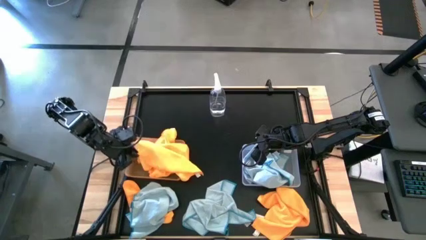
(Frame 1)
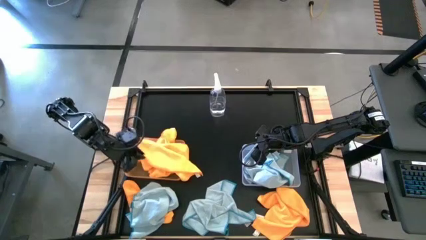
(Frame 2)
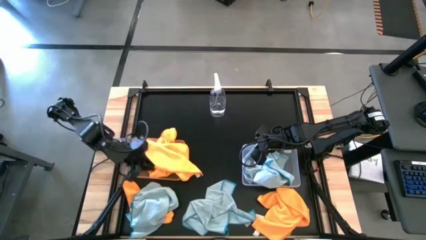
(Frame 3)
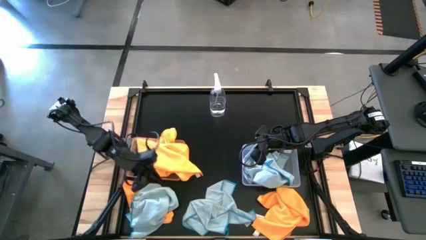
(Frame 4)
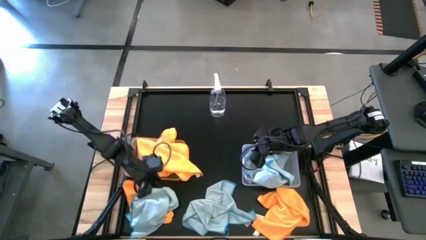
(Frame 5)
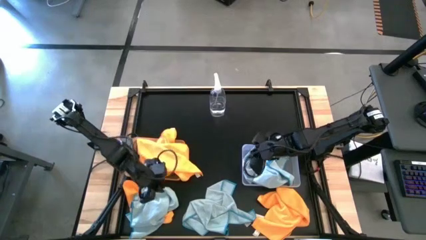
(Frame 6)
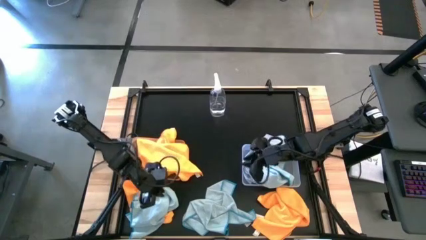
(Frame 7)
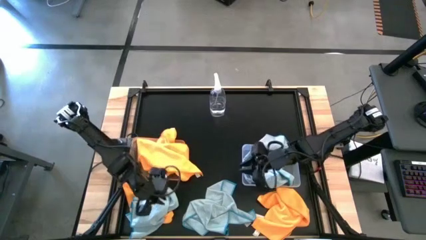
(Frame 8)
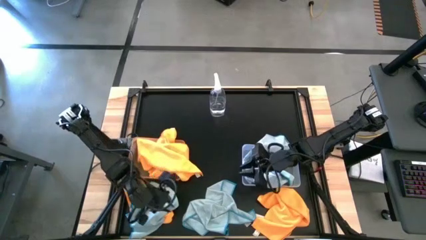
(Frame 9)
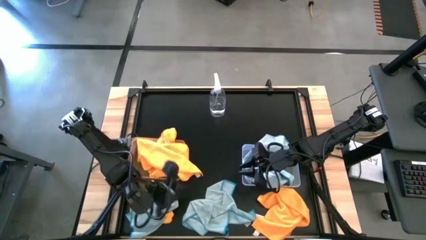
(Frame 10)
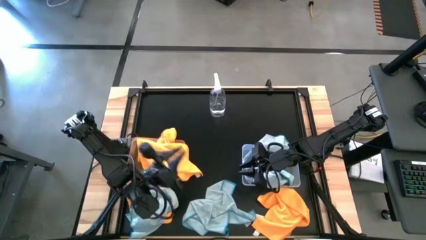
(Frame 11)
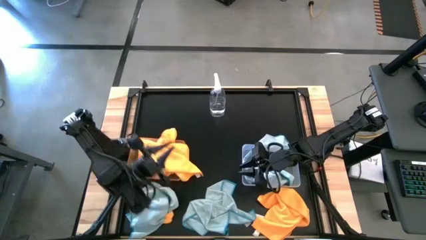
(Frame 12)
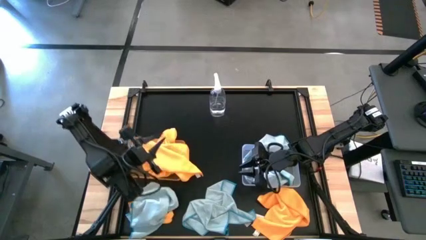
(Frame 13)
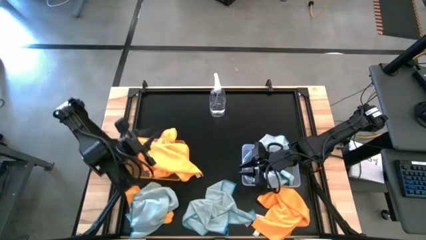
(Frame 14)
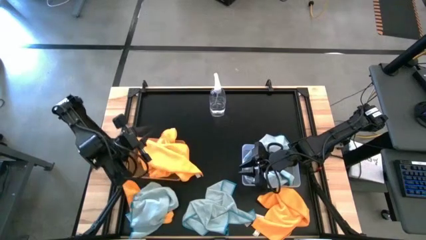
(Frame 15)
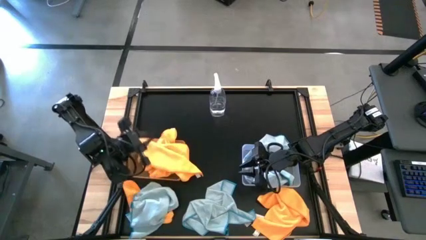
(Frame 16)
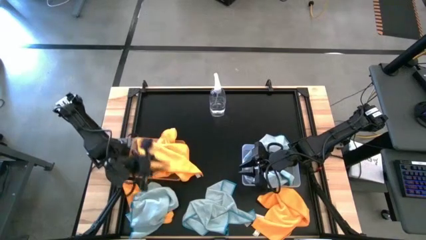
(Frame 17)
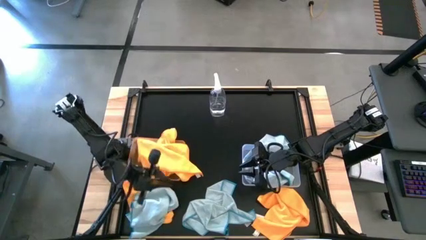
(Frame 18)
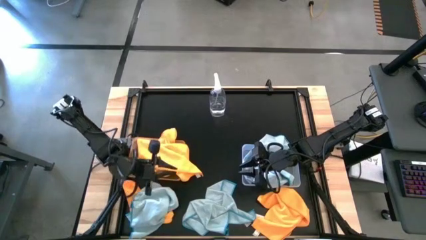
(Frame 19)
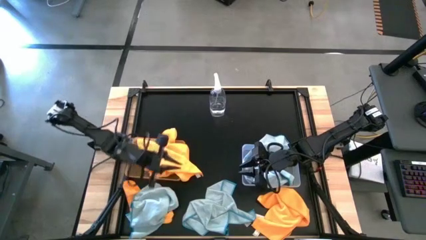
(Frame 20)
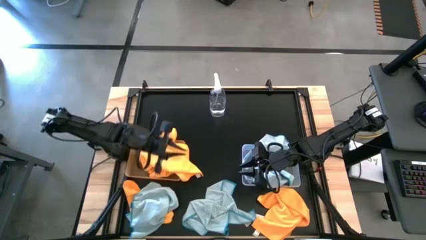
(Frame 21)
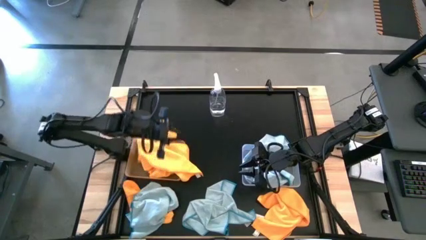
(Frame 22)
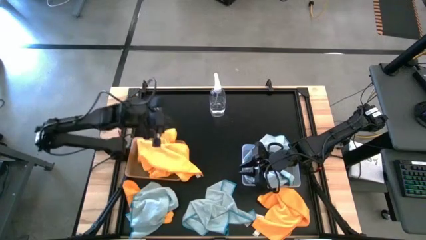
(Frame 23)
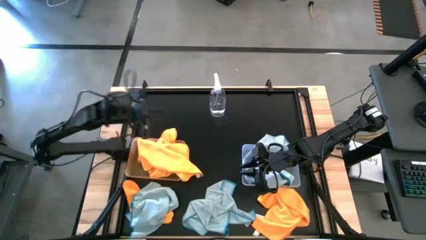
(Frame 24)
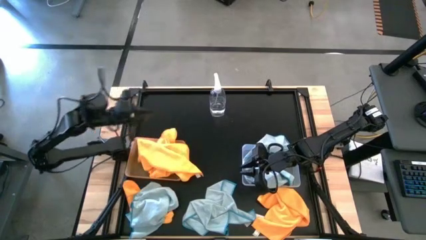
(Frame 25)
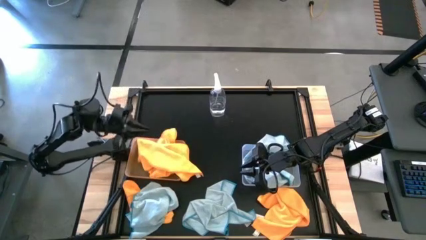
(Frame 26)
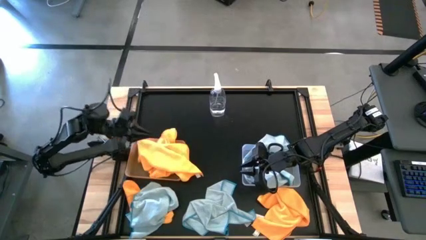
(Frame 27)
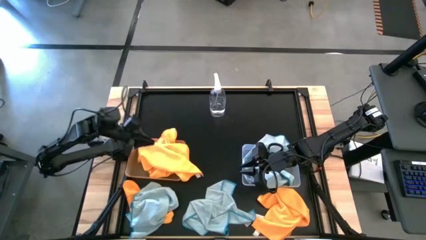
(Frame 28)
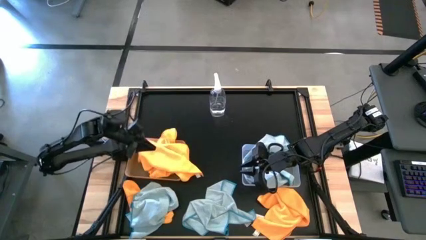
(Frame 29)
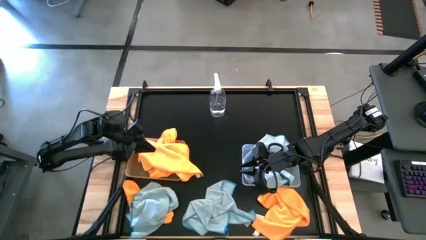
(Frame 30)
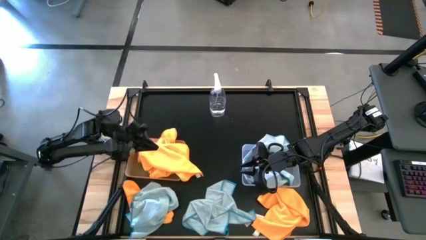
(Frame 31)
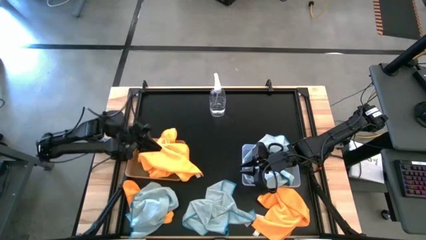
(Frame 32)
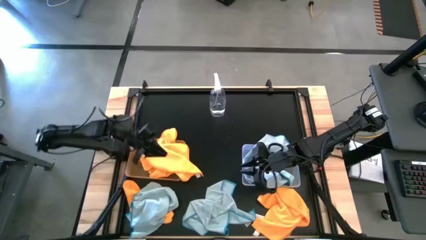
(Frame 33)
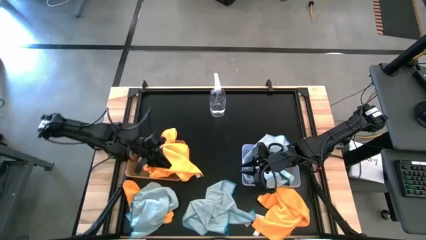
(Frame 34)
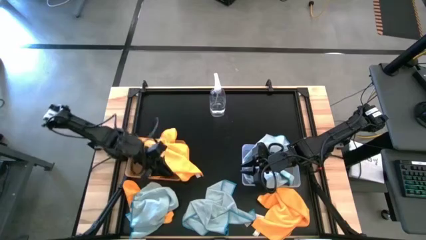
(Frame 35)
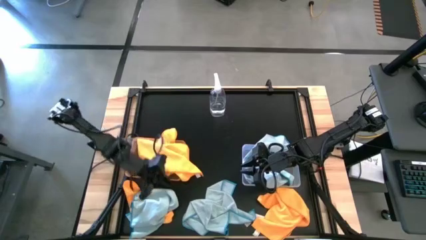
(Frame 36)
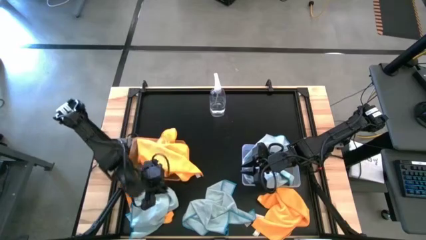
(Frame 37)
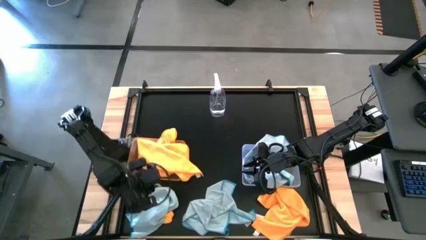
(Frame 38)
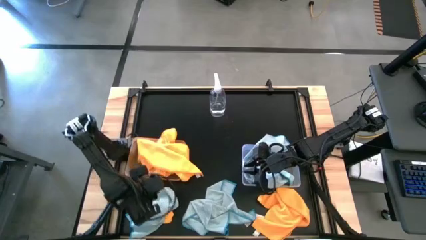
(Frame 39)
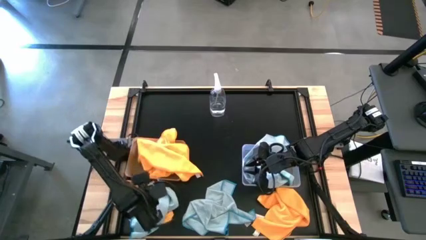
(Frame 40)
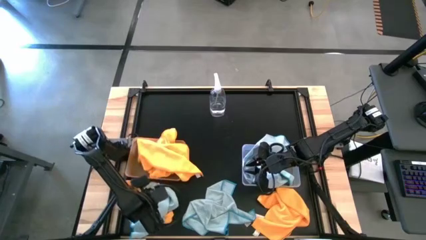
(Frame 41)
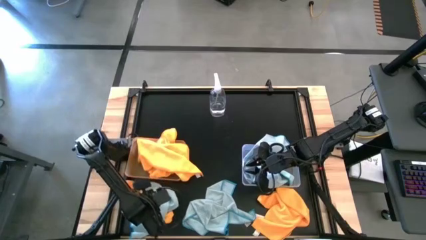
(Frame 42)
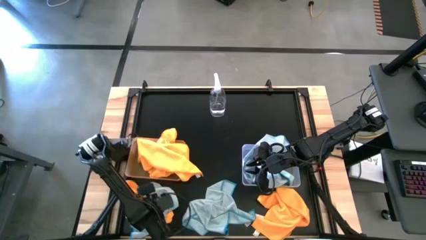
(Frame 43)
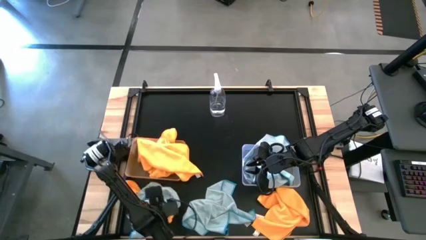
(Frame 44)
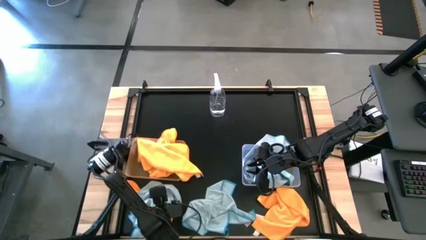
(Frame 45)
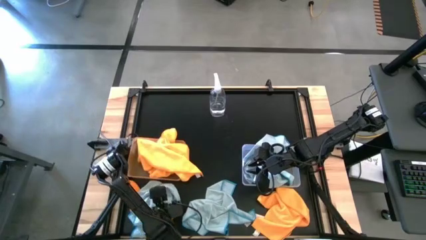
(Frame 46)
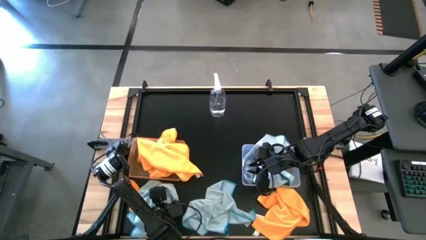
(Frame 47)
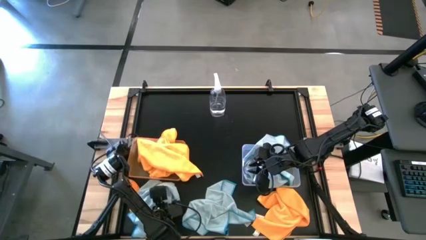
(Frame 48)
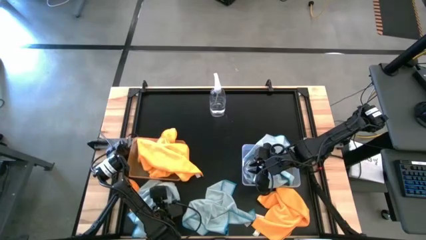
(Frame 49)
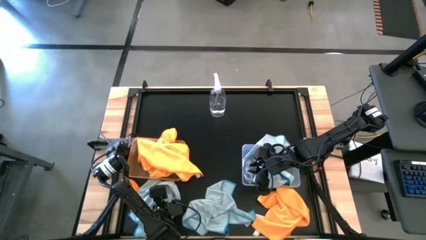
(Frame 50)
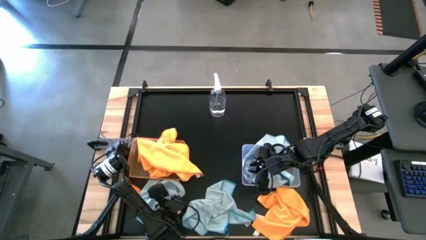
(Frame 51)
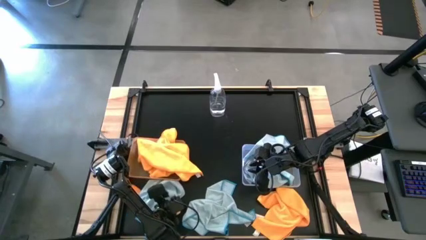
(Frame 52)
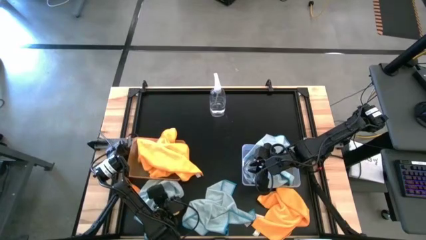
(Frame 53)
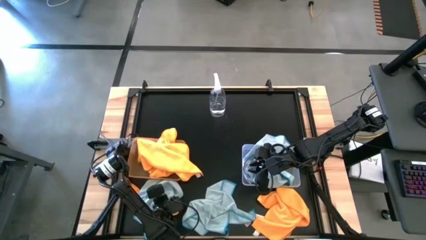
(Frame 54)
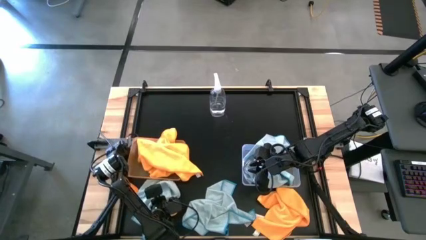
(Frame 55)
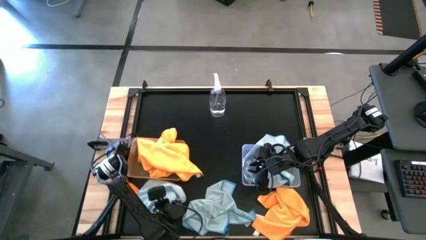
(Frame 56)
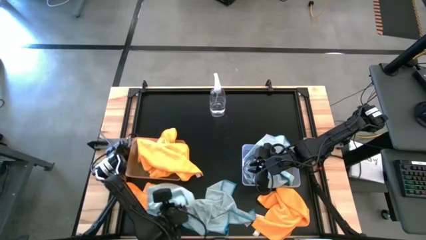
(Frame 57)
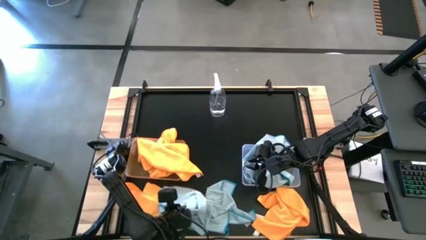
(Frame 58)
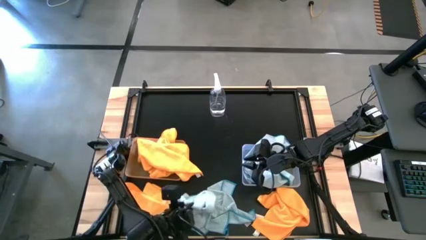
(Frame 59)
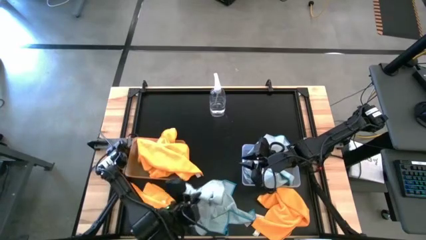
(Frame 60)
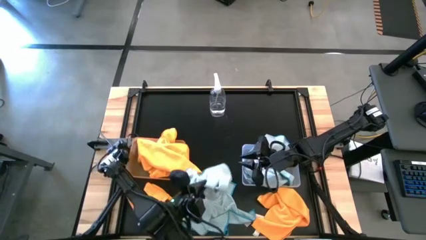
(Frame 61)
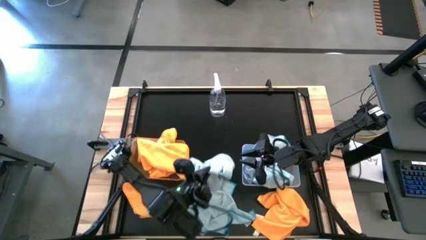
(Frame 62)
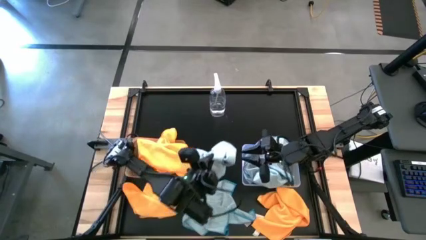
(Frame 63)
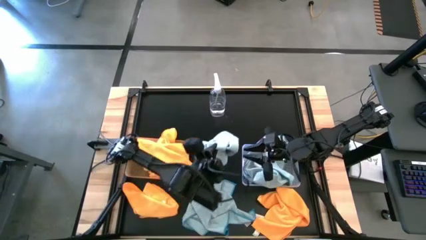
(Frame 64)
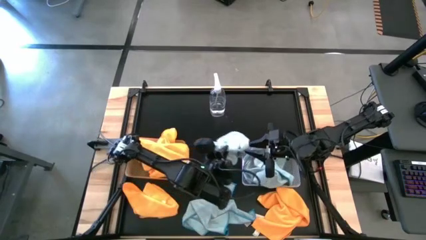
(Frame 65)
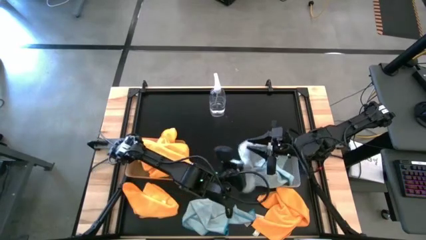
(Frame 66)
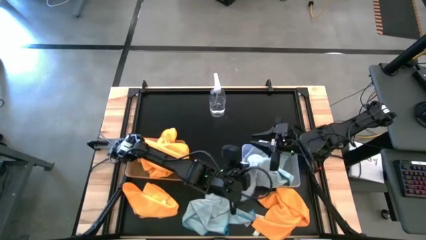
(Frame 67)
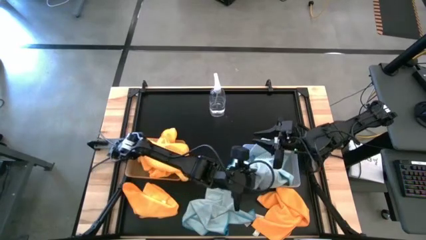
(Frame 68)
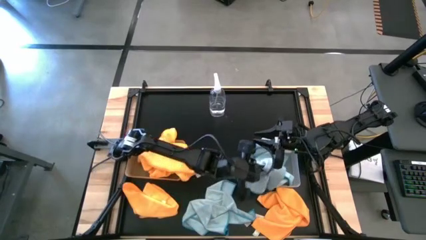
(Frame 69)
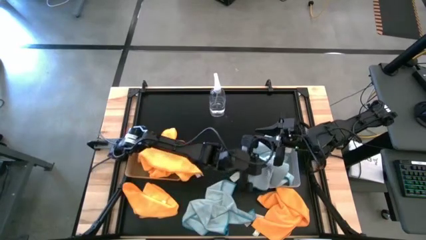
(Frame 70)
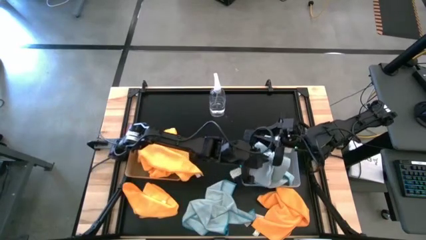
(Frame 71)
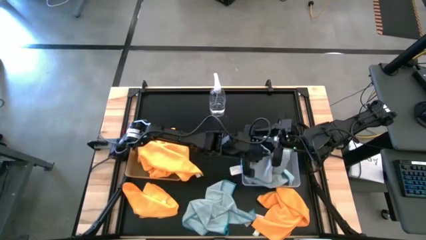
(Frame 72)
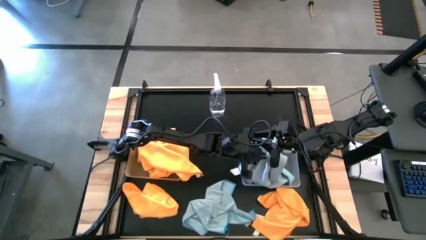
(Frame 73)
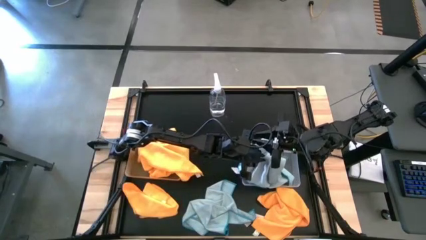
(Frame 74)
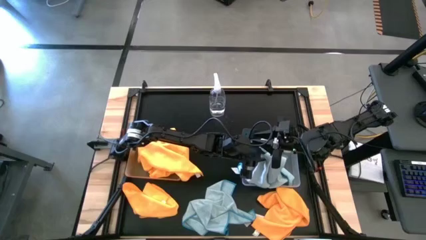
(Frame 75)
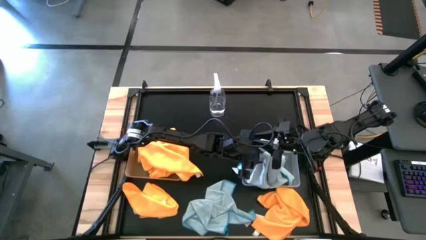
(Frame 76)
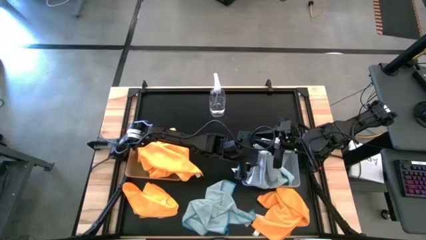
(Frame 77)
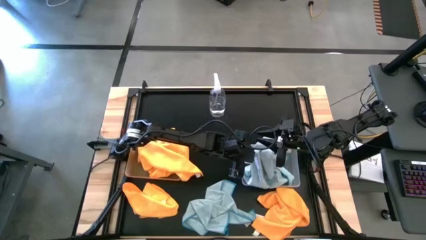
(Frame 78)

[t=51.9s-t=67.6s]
Task: Sort microfiber towel by color & place in baskets
Put the left blue microfiber cloth into the transparent bin
